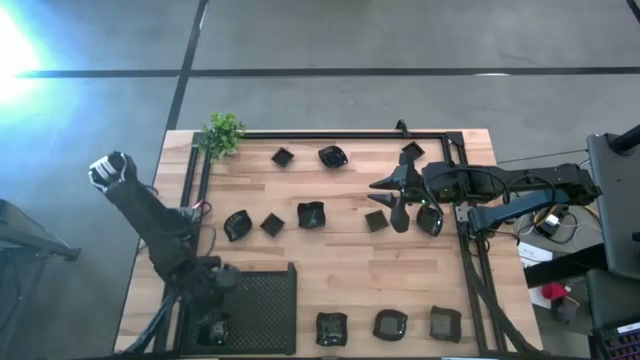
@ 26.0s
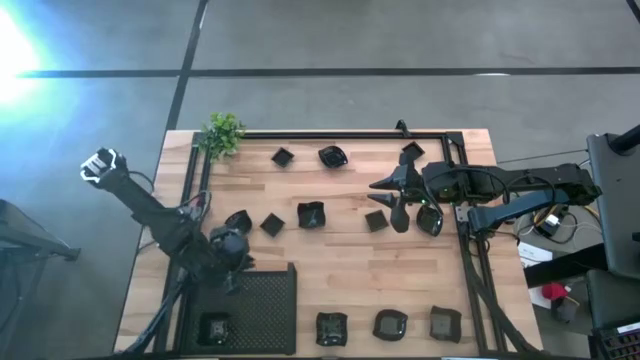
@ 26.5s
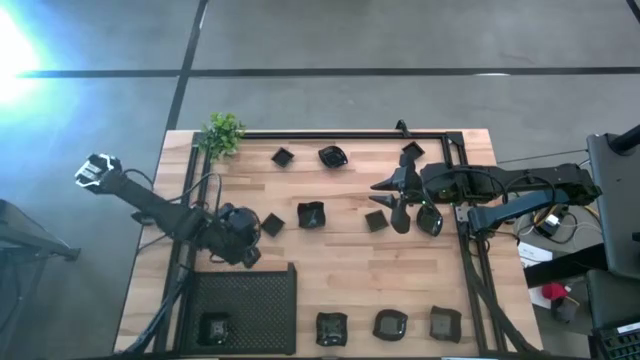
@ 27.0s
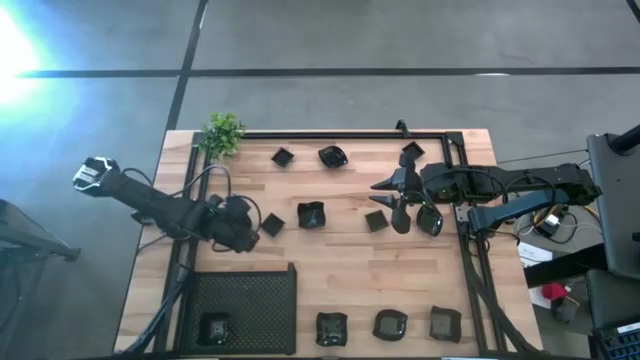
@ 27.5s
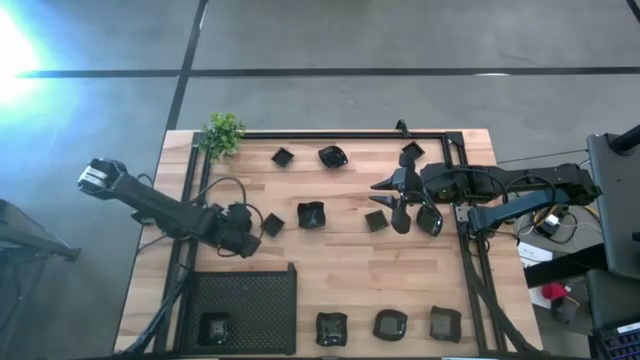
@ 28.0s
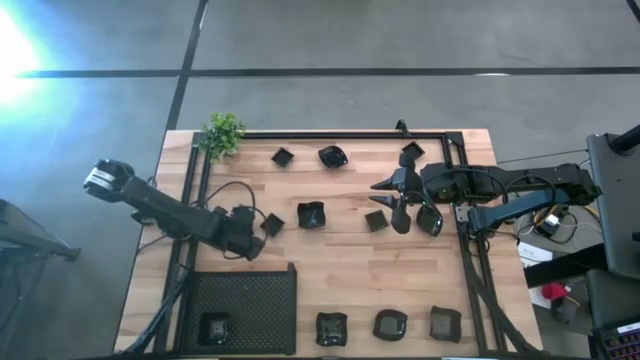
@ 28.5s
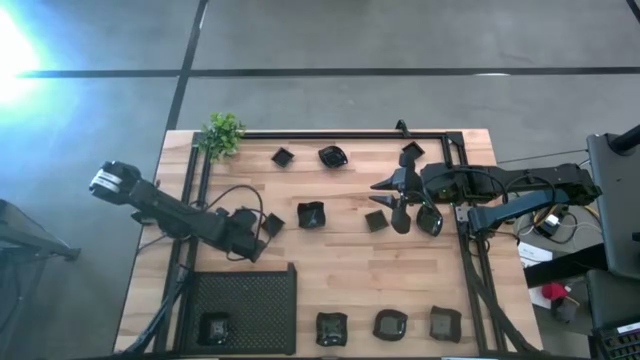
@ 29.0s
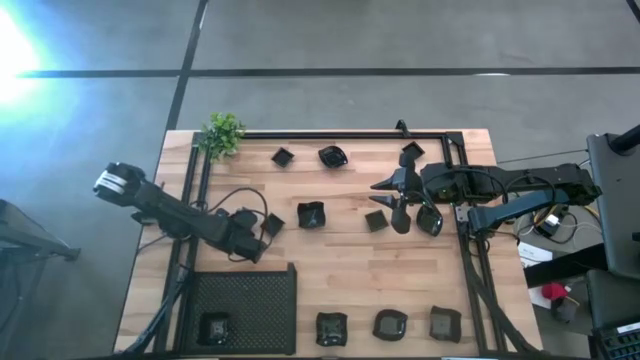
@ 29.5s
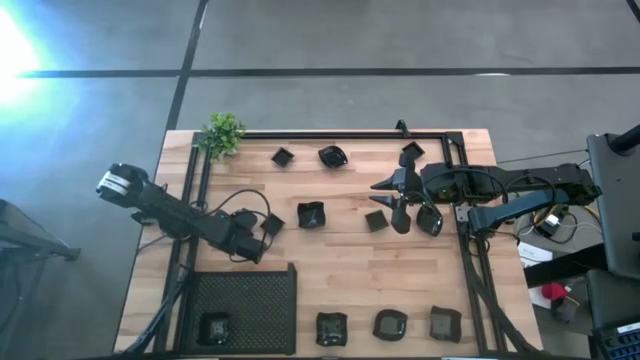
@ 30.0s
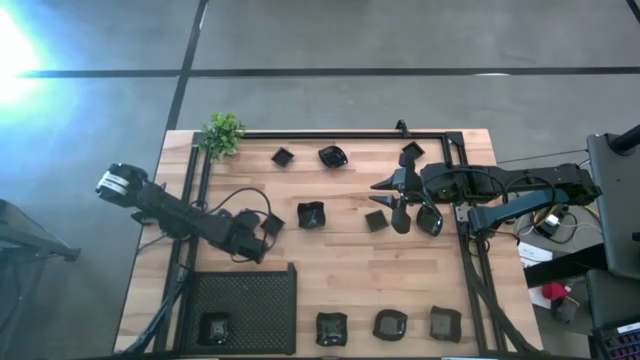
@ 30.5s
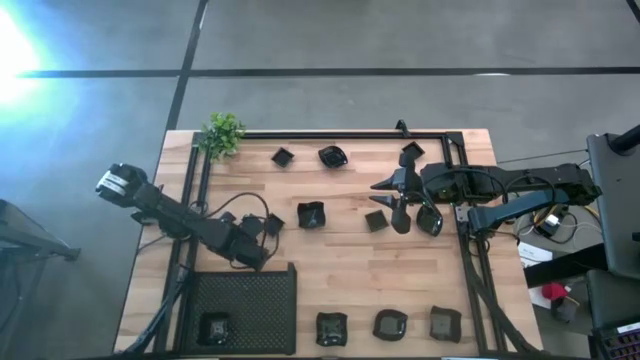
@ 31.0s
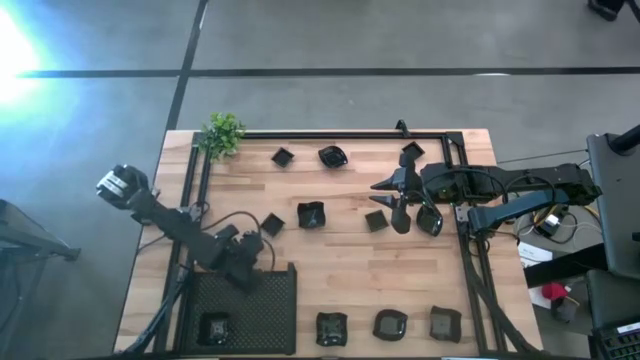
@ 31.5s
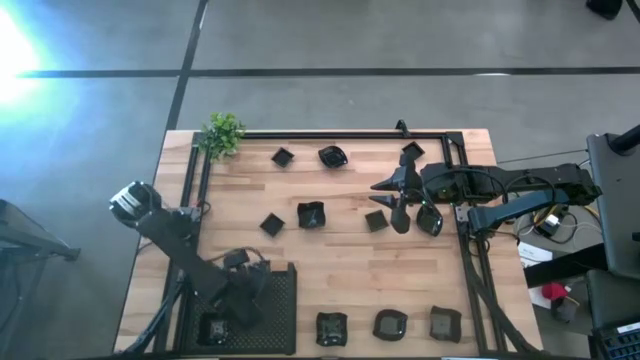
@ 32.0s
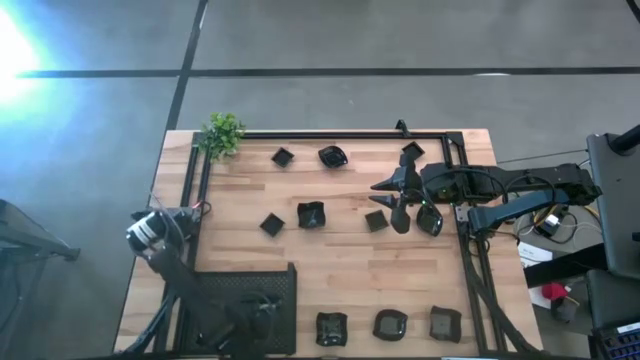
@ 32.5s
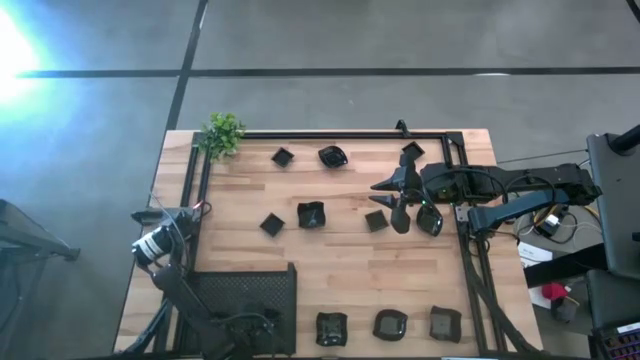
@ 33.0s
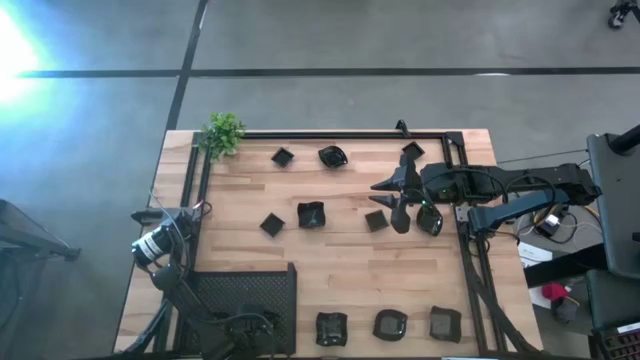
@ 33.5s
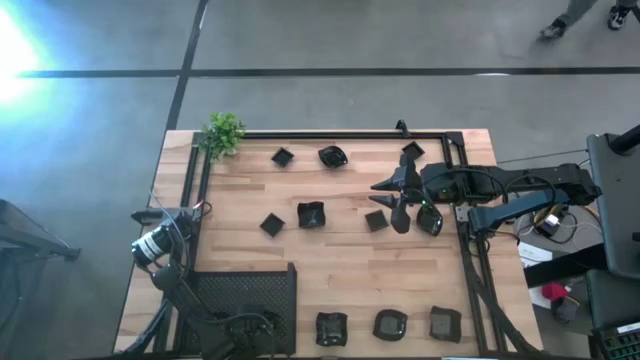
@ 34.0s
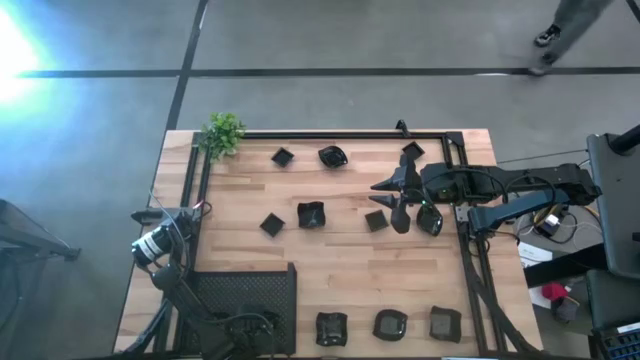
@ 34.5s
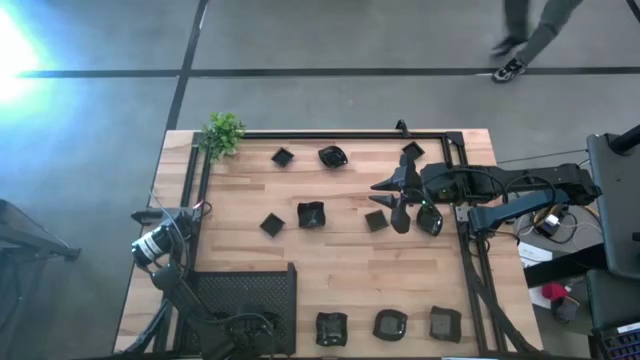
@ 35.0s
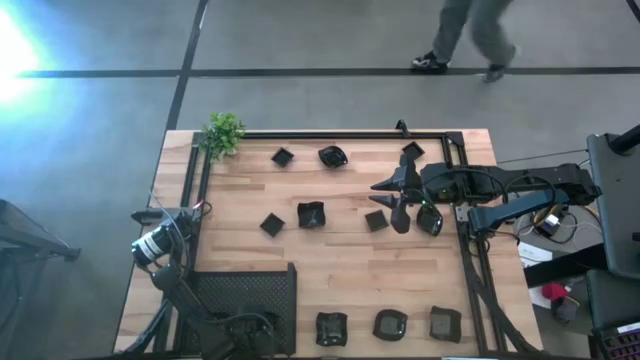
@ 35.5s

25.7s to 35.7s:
Task: Pick & Place Mini shaped plates
Put the leaf shaped plate on the shelf

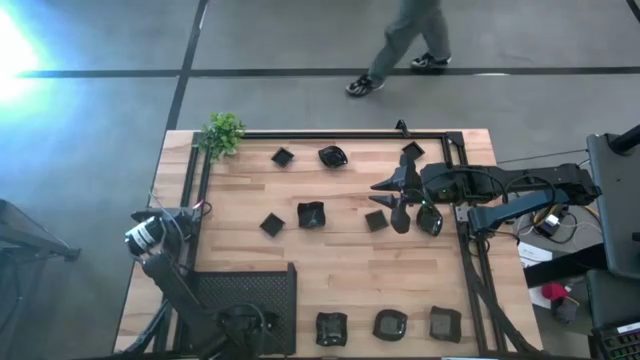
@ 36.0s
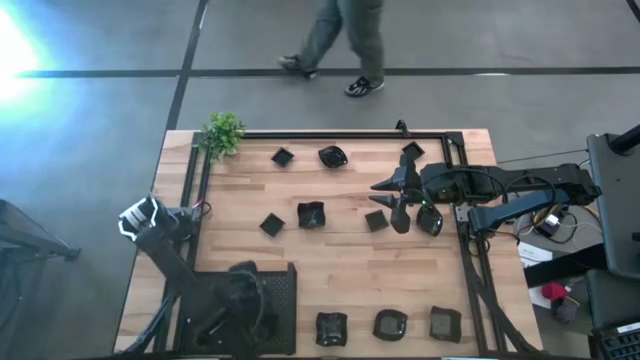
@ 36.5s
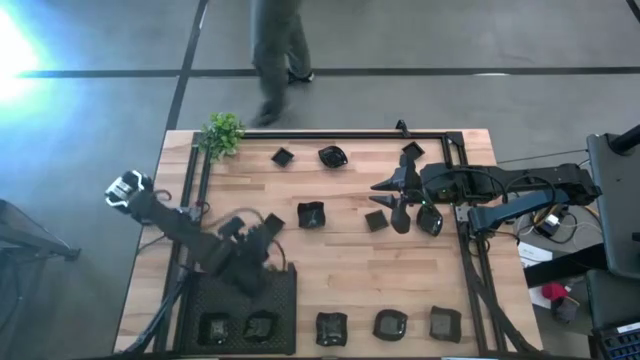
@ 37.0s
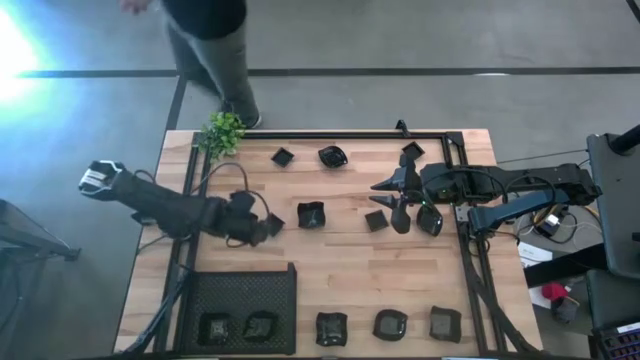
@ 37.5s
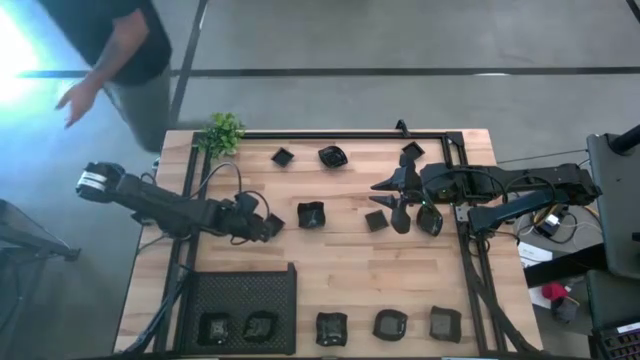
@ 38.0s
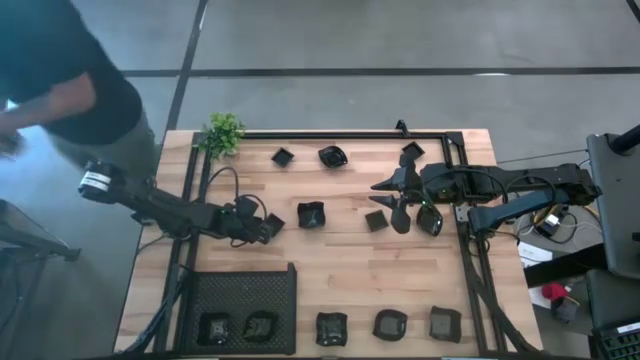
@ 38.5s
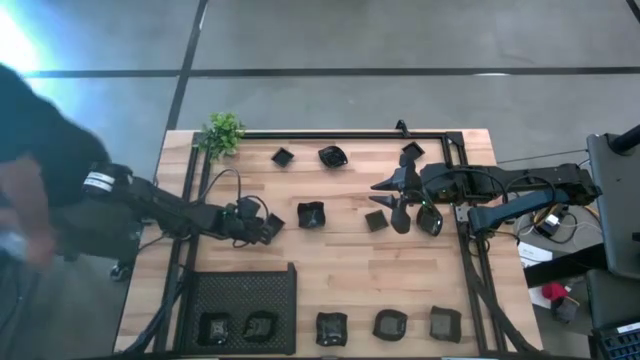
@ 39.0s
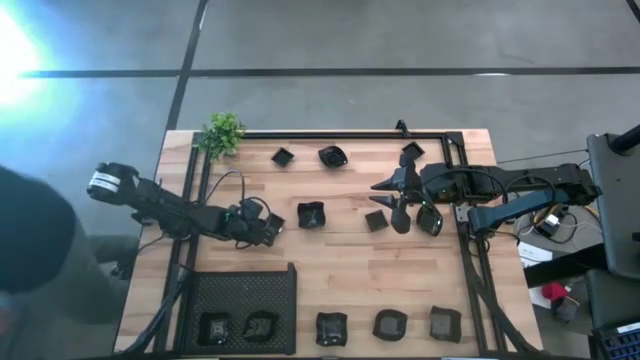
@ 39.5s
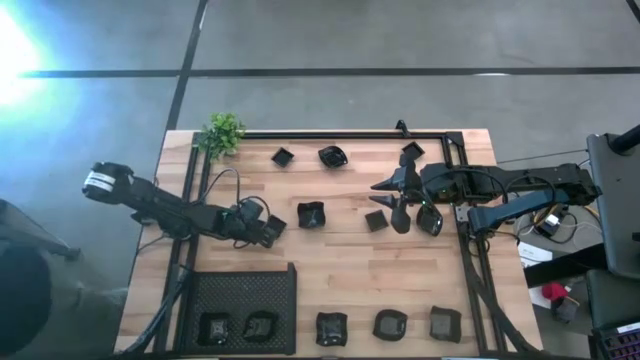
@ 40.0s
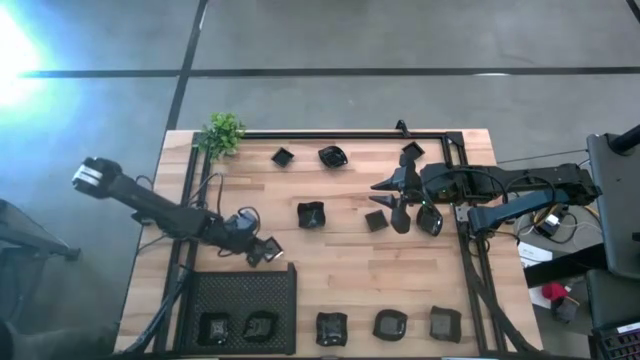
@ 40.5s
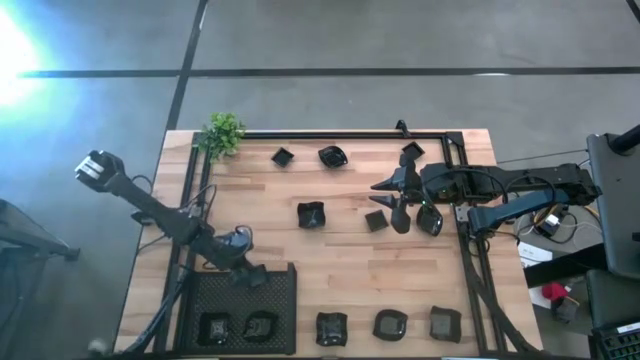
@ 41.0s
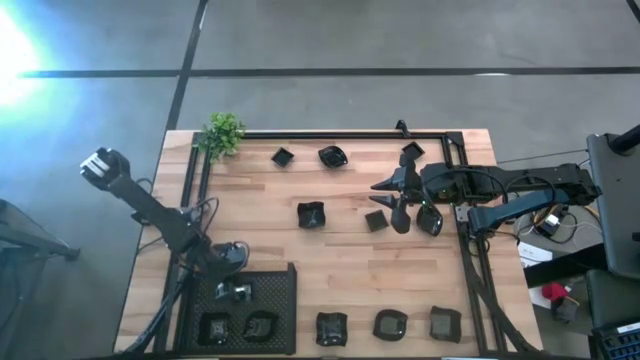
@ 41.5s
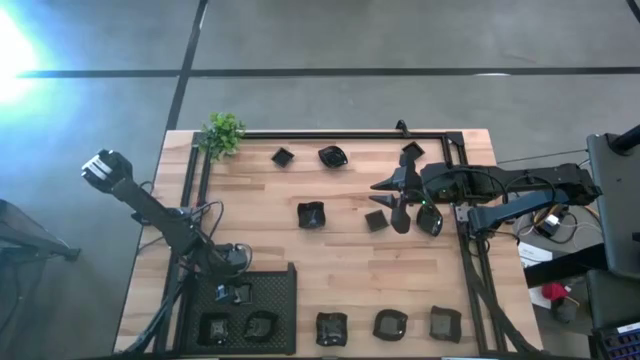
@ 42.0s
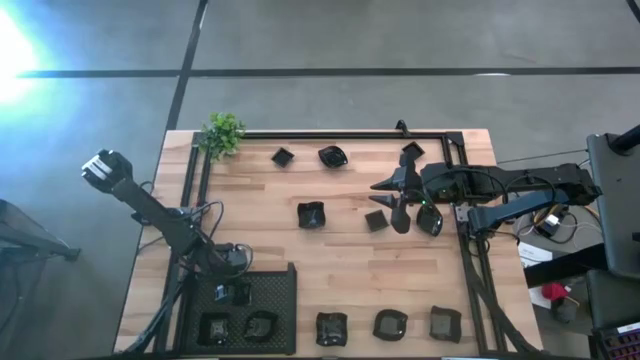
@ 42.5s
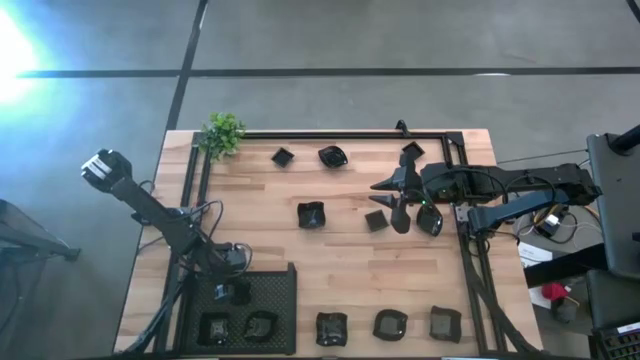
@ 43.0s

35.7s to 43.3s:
Put the square plate on the shelf

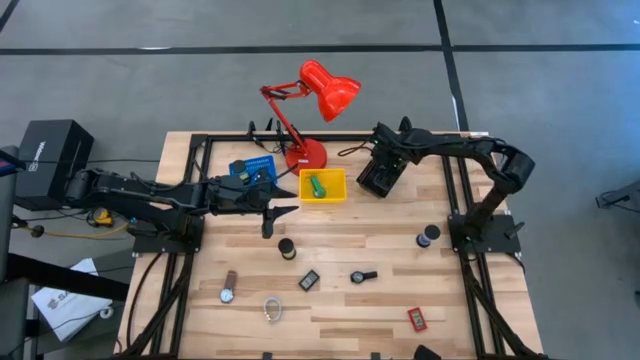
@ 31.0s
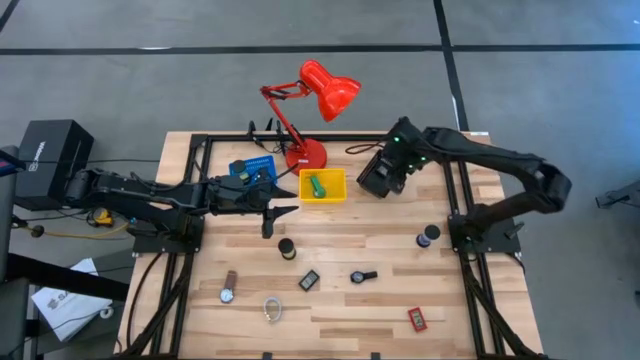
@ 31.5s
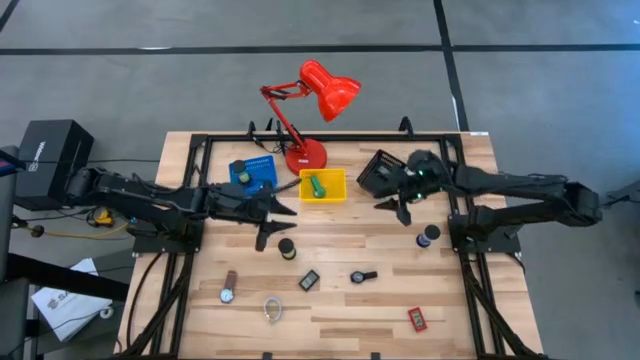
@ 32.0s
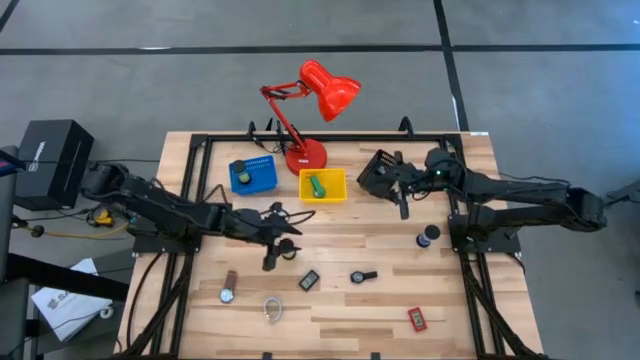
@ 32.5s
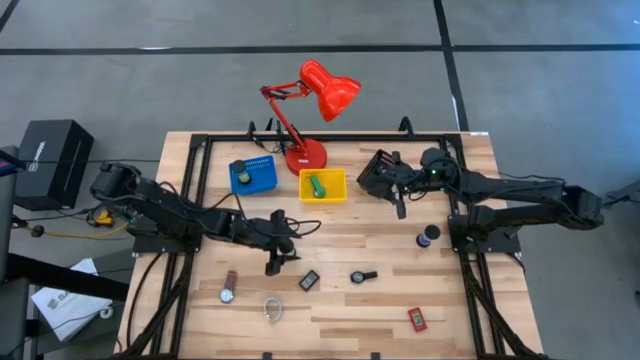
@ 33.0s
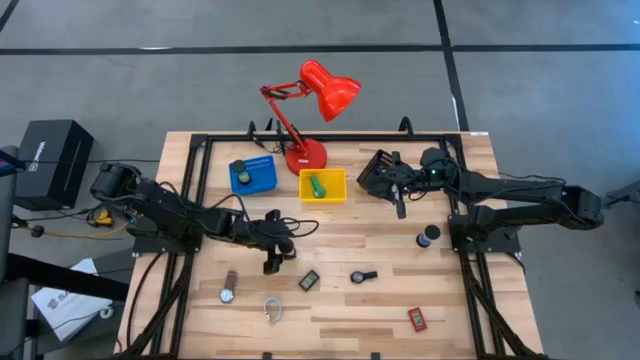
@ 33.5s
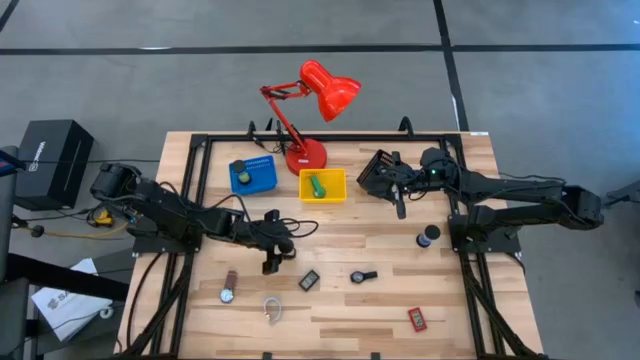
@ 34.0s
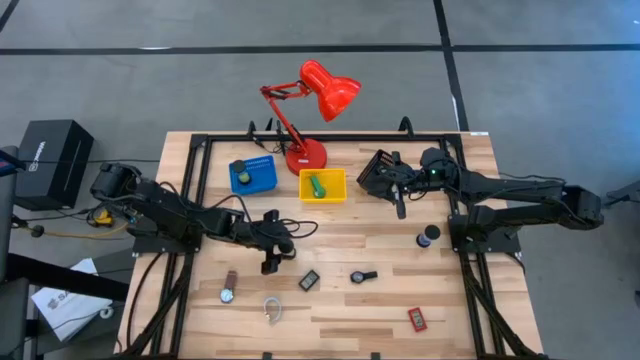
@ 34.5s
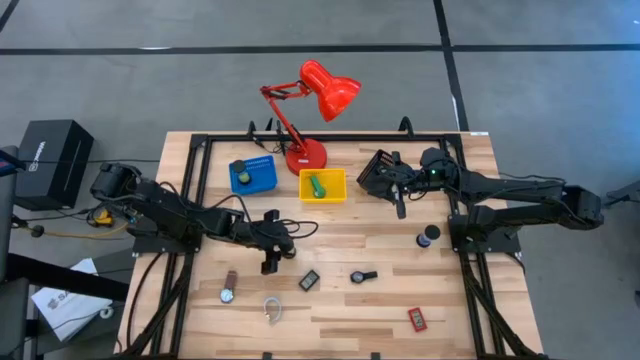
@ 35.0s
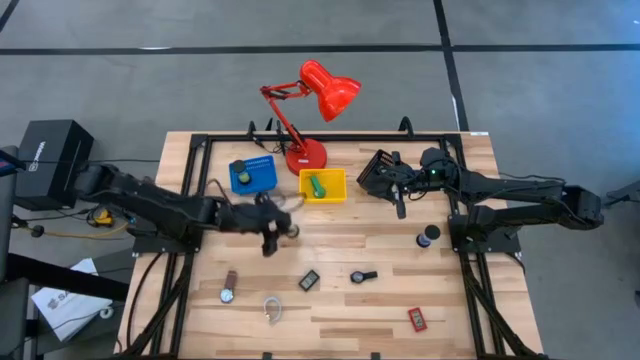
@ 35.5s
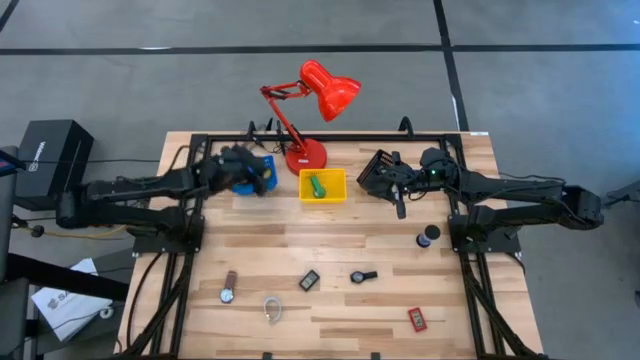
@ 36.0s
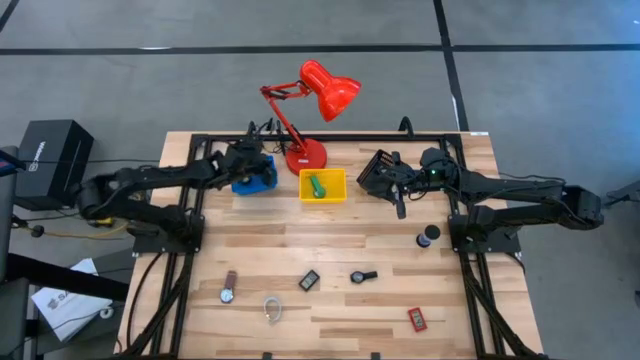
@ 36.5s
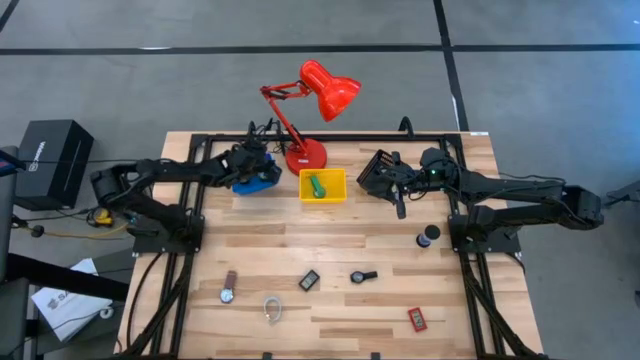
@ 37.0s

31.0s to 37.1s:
Task: Pick & Place Office items
Put the light green hourglass into the blue bin
